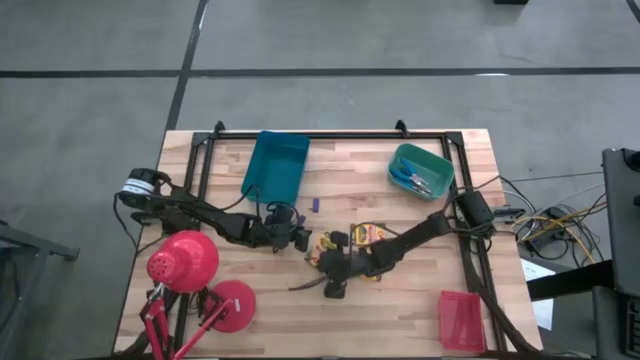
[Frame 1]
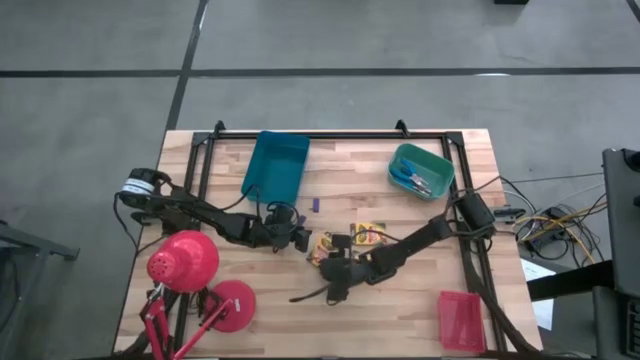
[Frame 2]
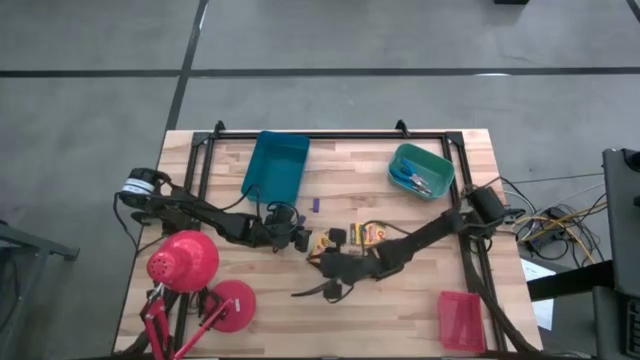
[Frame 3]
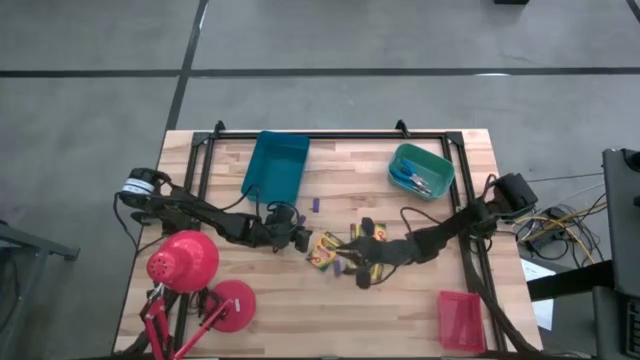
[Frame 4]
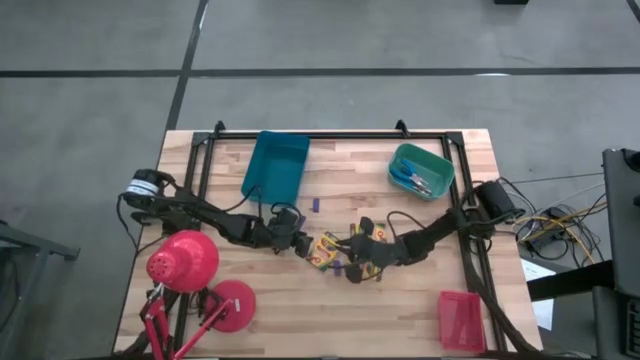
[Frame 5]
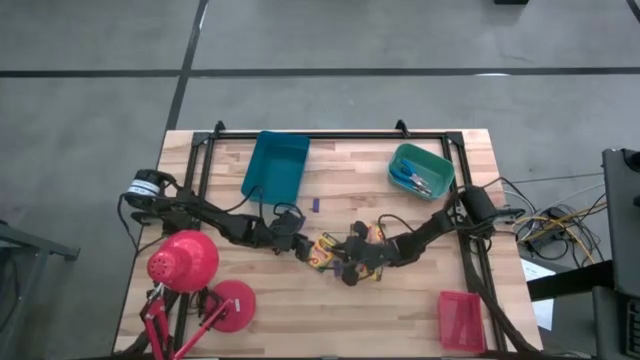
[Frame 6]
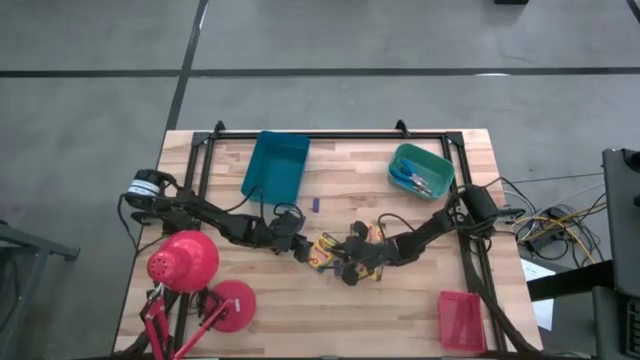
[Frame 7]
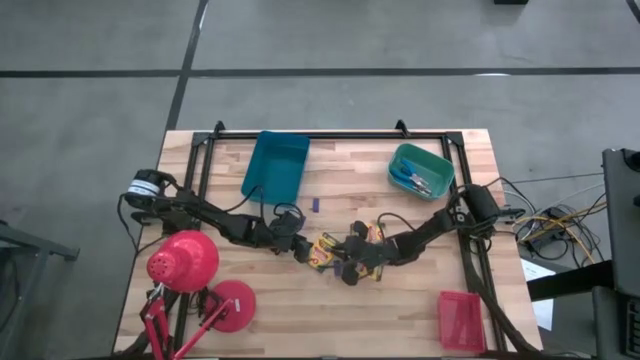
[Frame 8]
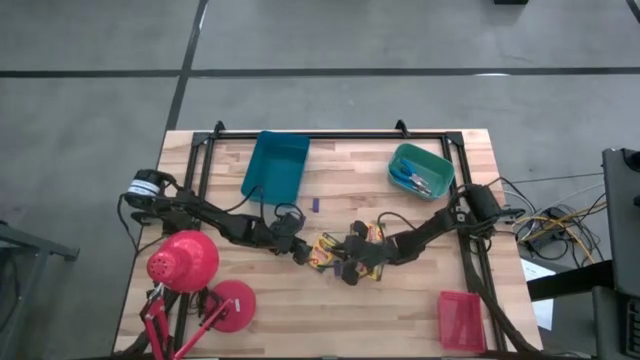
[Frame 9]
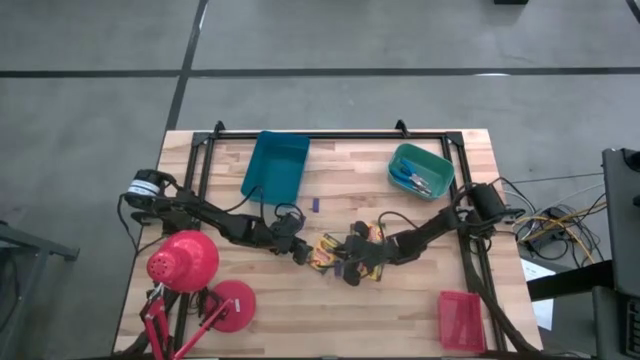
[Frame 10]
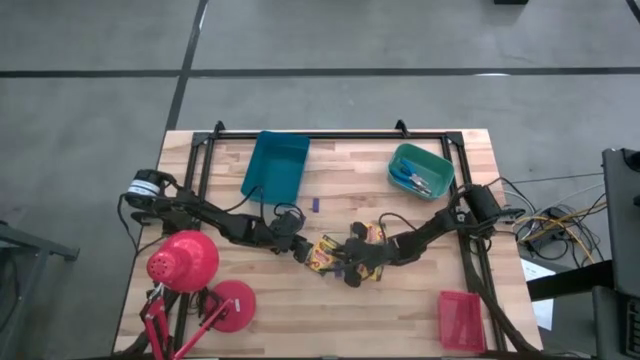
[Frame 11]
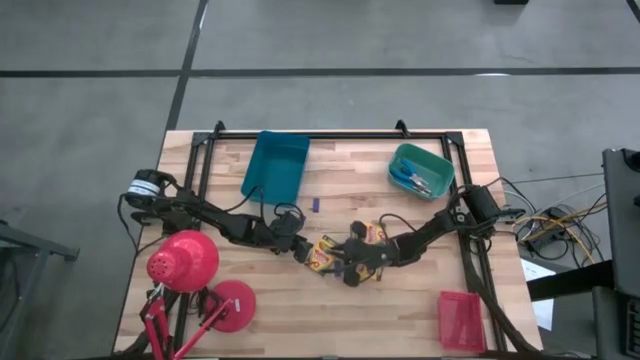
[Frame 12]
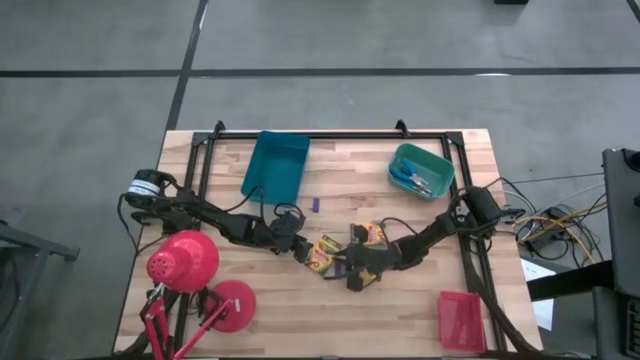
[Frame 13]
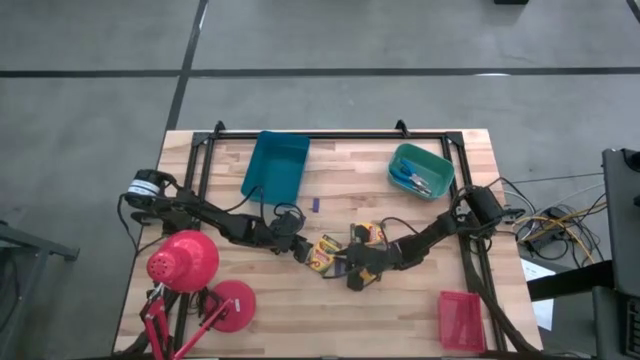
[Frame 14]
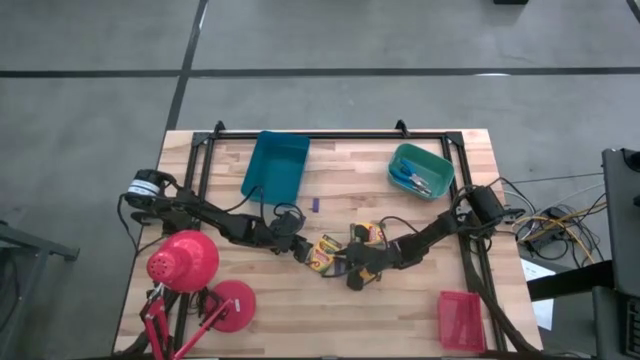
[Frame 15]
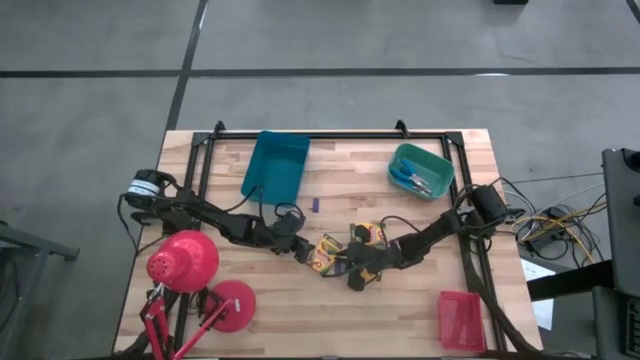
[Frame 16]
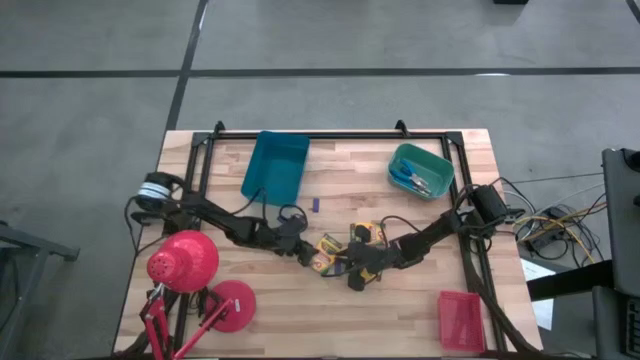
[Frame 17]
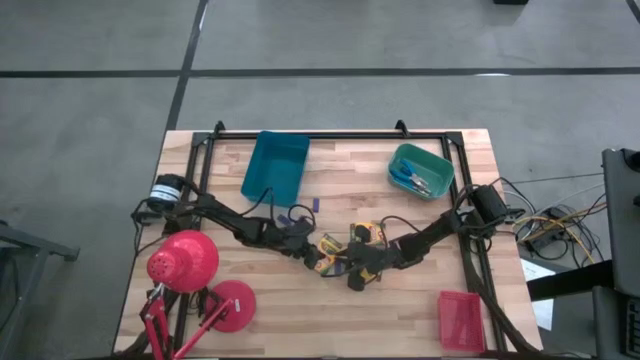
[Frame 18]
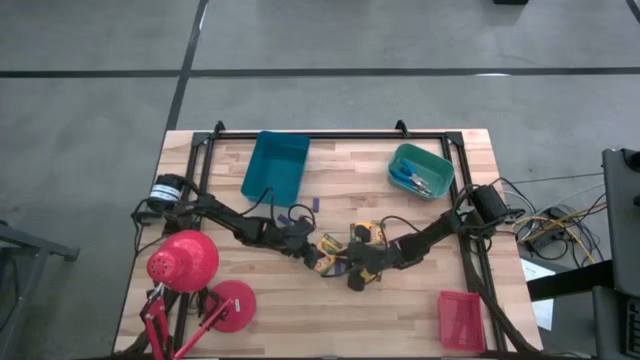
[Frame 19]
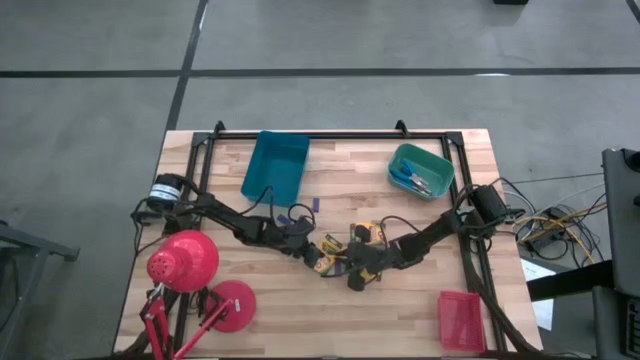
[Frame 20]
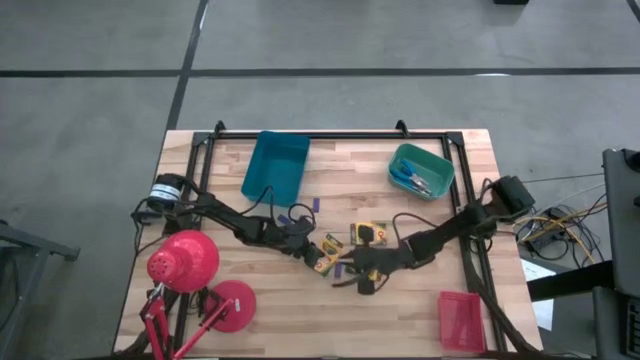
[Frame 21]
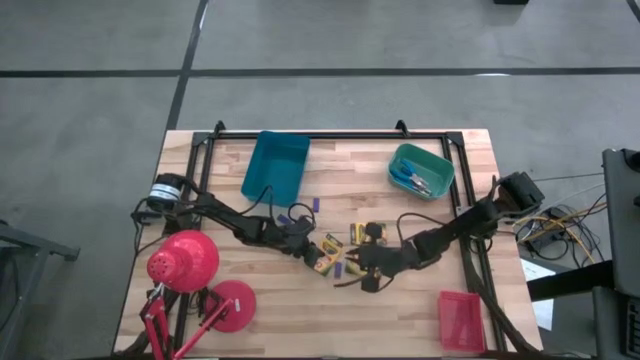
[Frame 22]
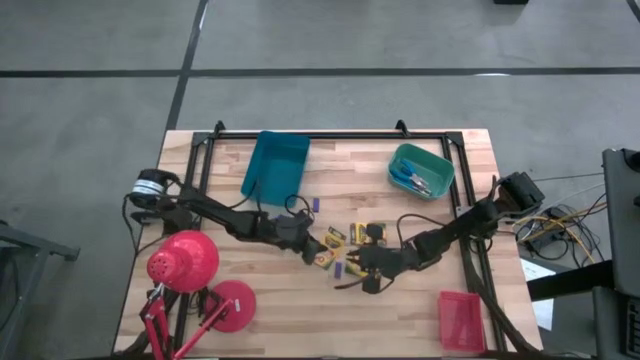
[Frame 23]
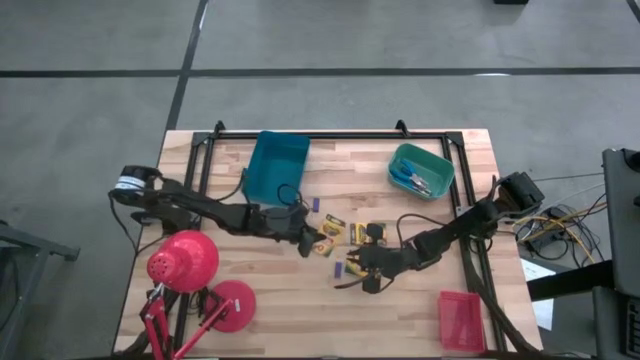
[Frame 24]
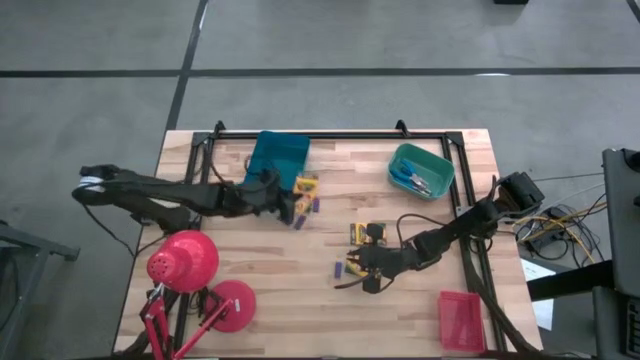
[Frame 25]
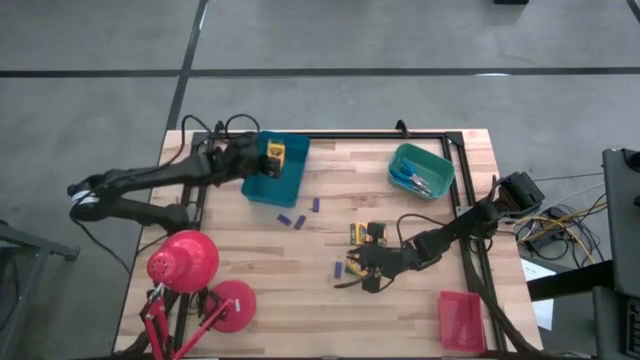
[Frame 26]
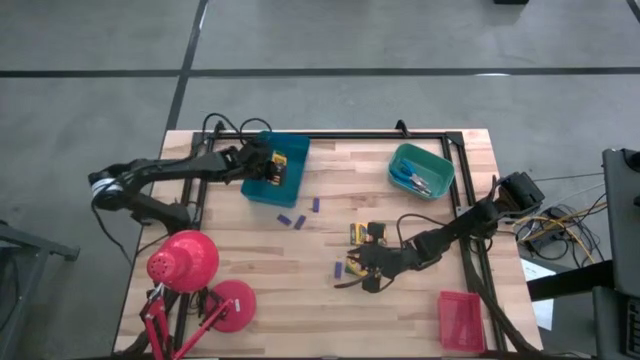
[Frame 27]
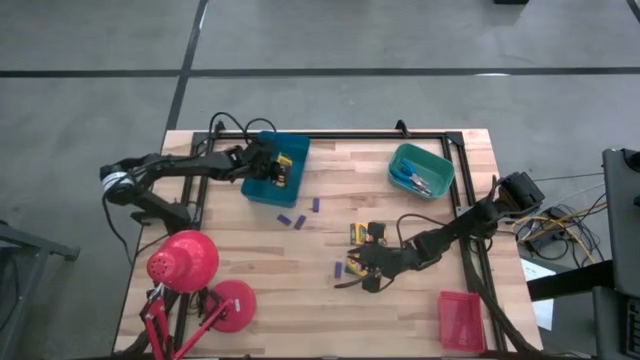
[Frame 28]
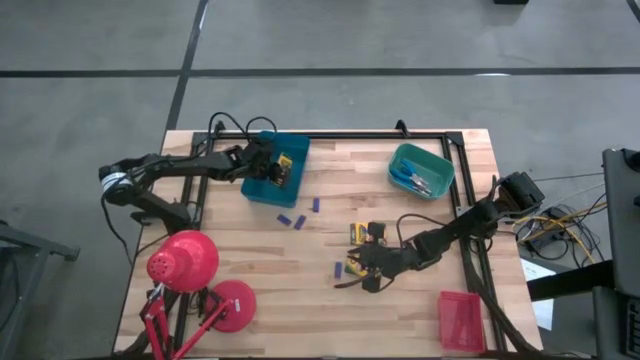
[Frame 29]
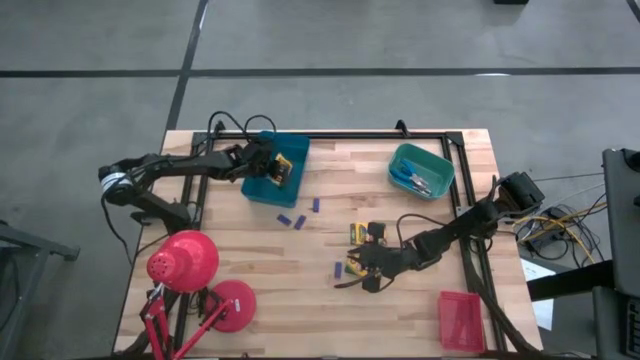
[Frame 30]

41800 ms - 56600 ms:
Task: Pick & Place School Supplies
Put the yellow crayon box into the blue bin

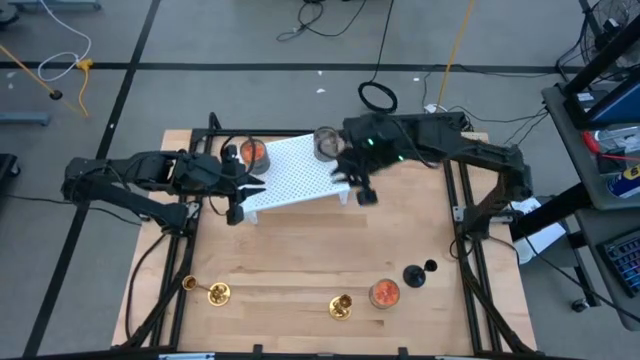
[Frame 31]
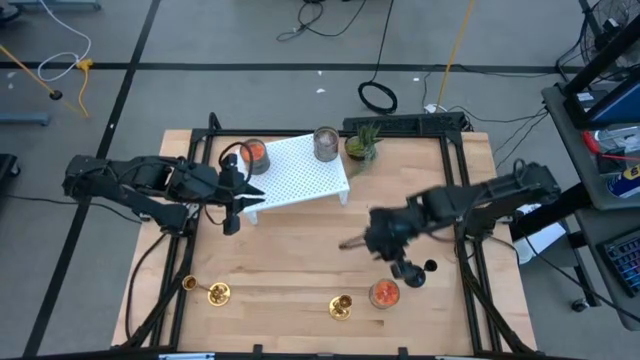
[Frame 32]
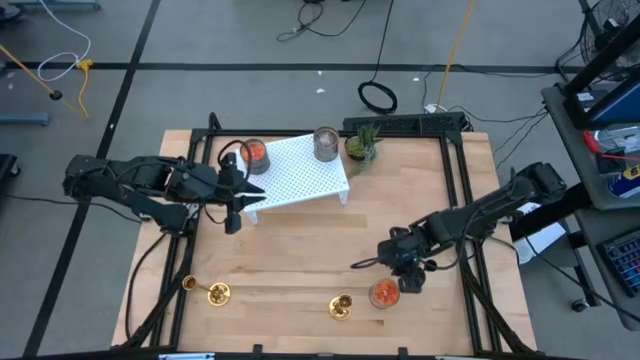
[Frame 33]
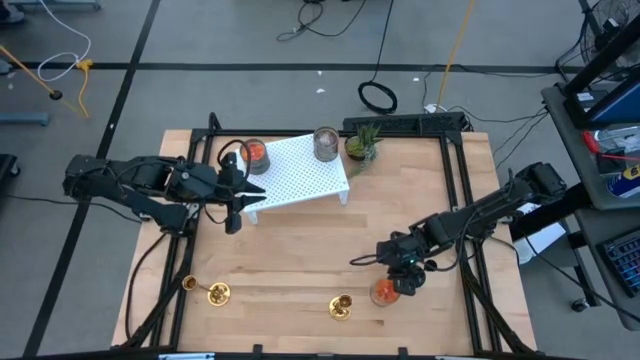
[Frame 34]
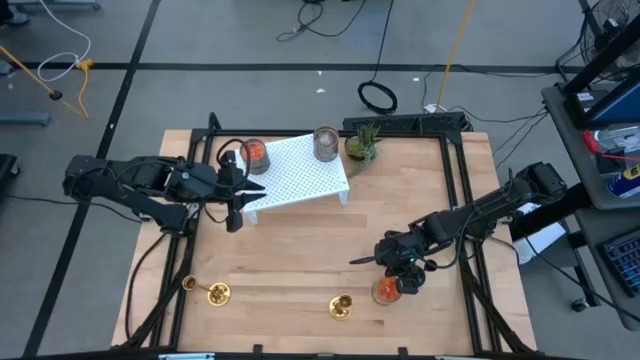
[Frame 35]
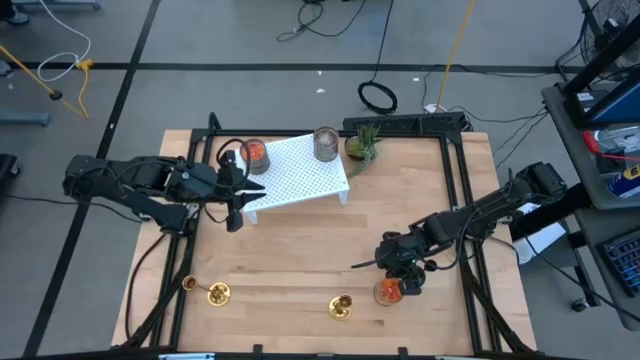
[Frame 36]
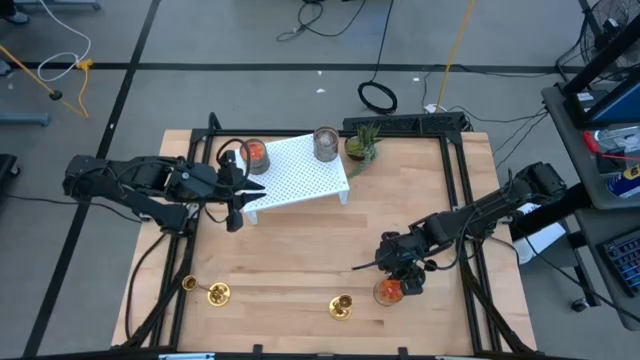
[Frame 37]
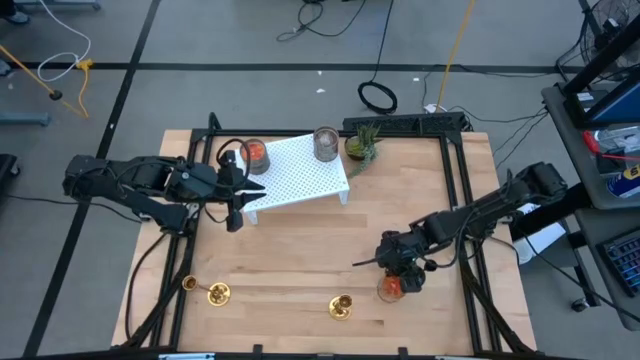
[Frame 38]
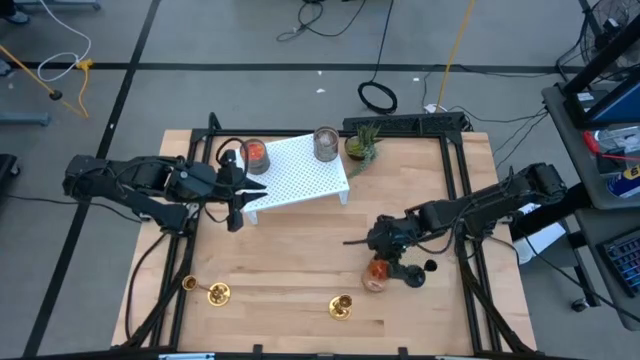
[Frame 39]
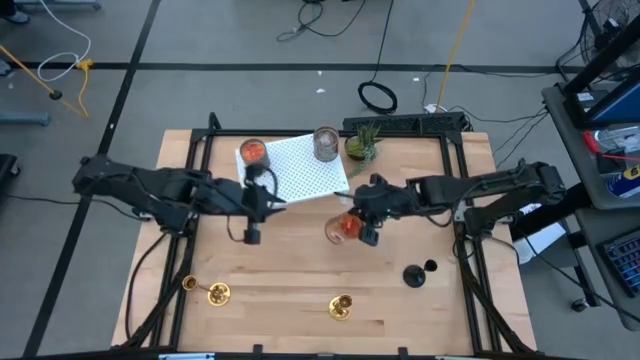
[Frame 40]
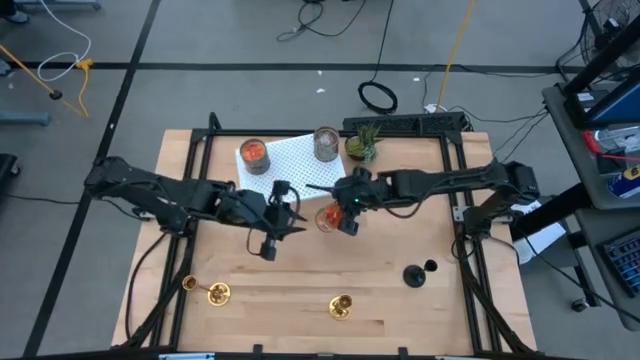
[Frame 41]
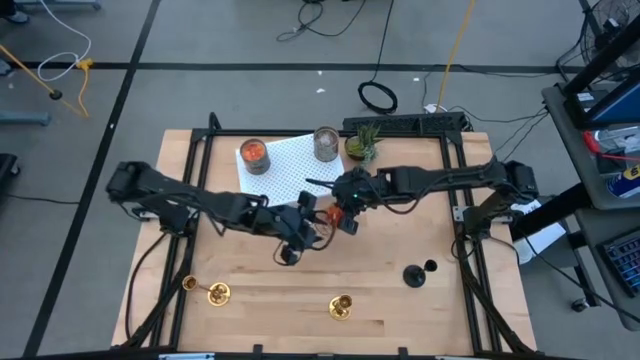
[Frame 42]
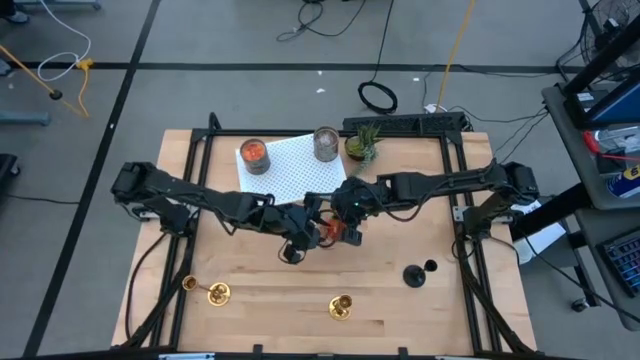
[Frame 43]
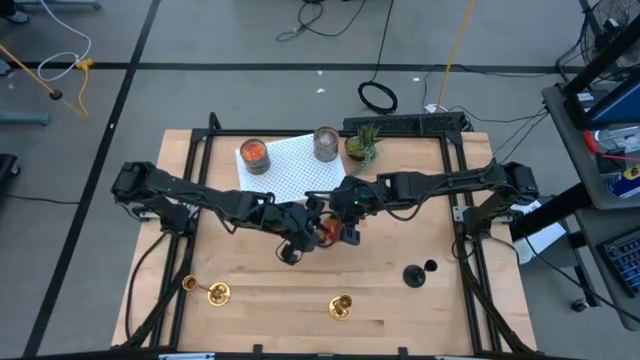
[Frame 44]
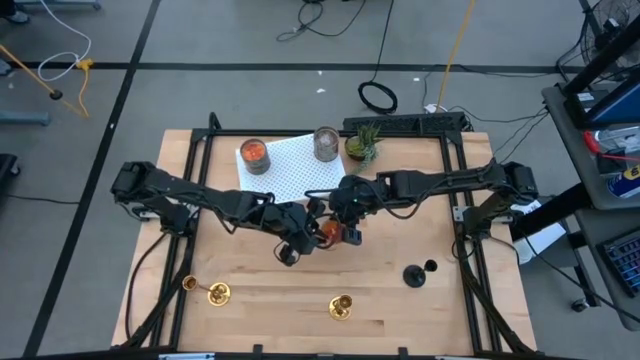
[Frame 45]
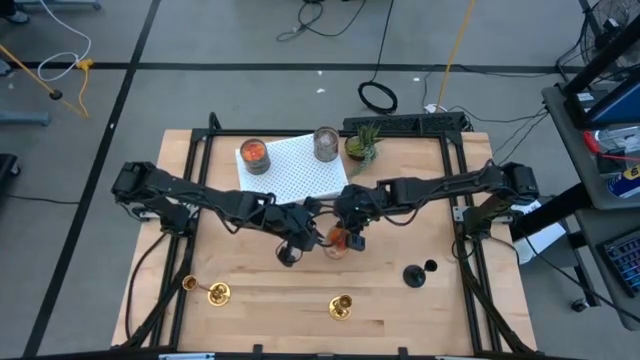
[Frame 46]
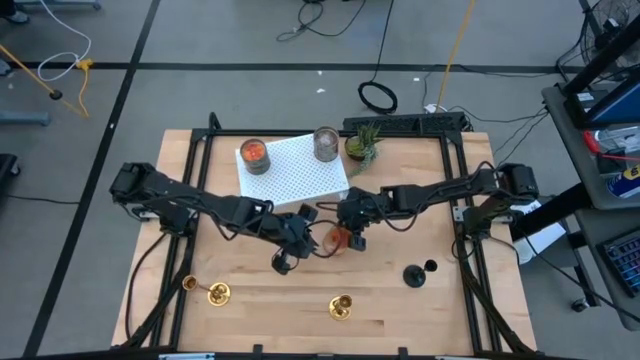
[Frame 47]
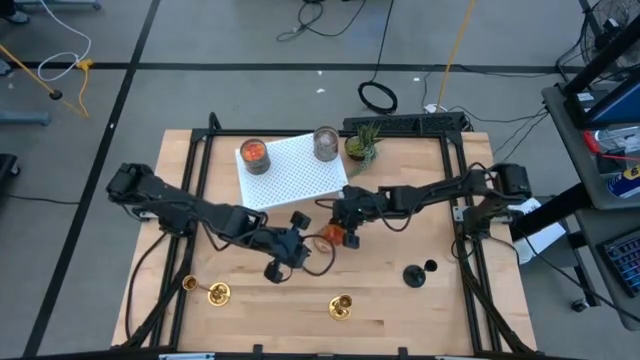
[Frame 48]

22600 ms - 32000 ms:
Task: Pick & Place candle stick holders
Put the orange scented candle on the shelf
